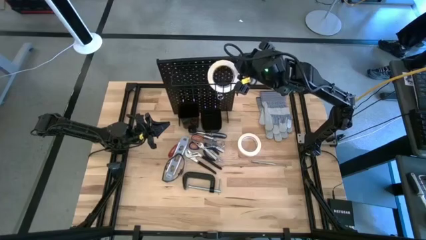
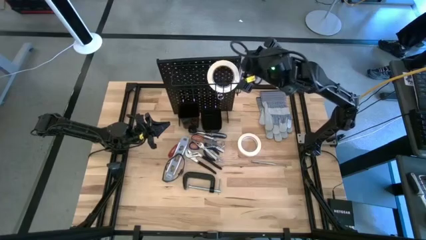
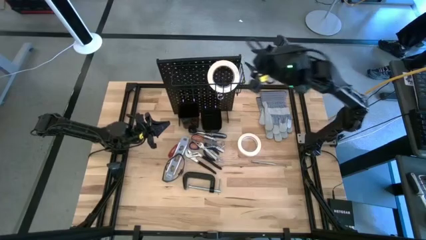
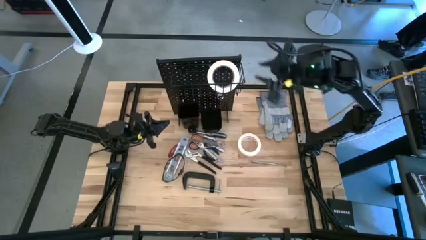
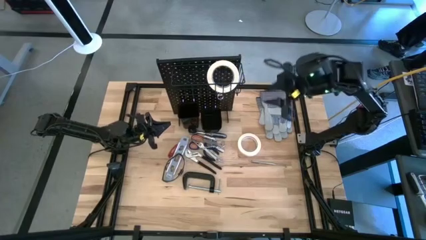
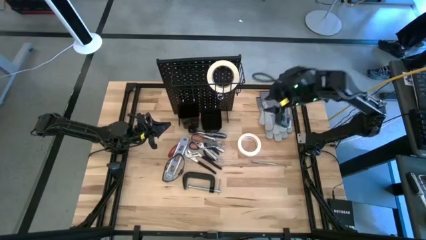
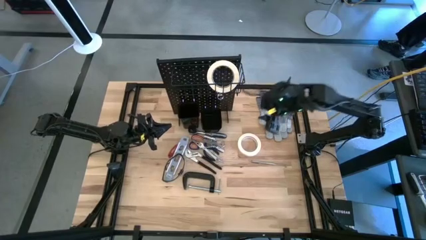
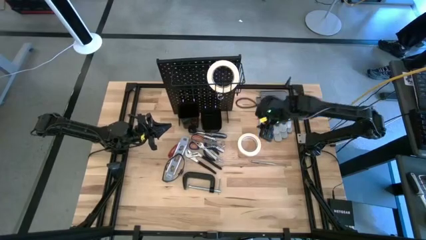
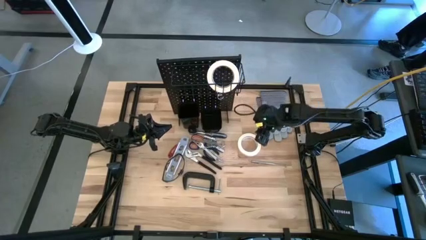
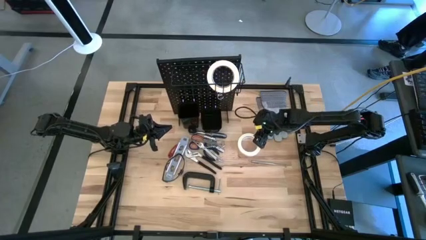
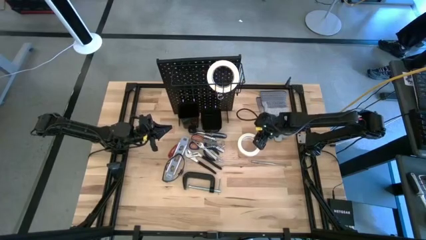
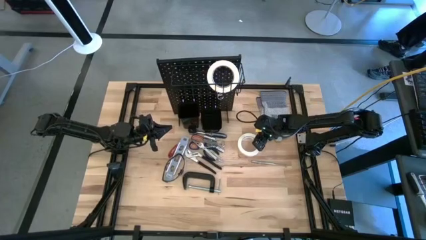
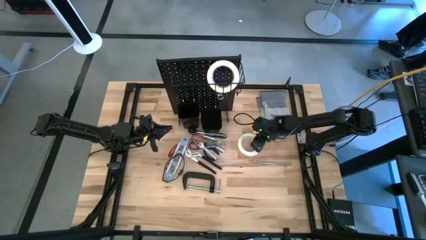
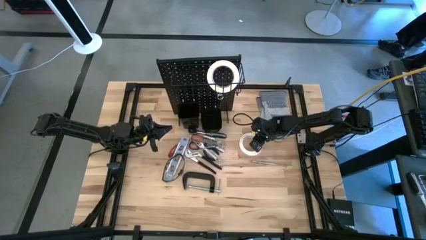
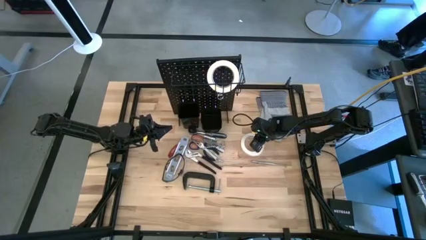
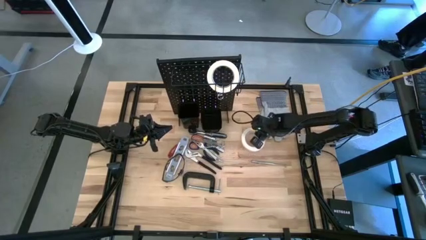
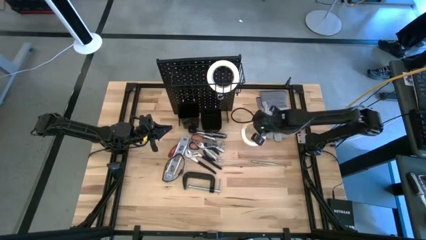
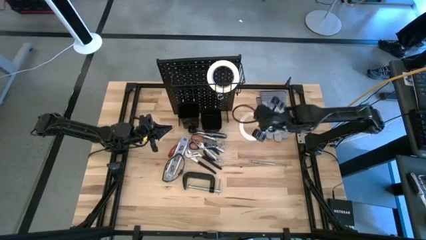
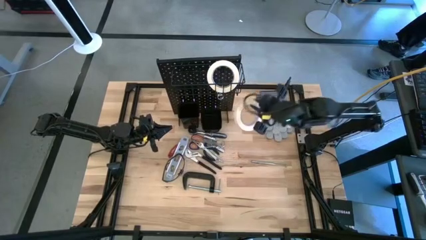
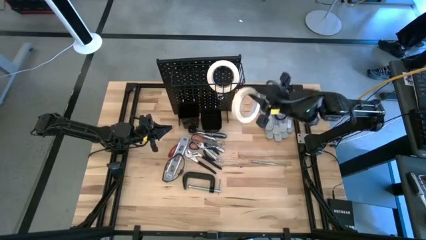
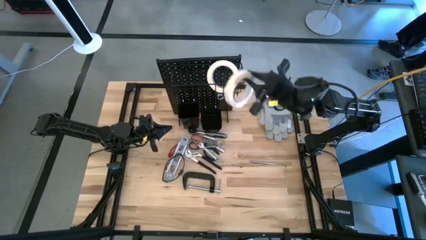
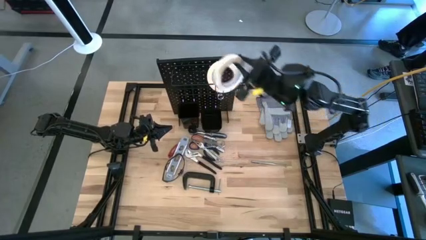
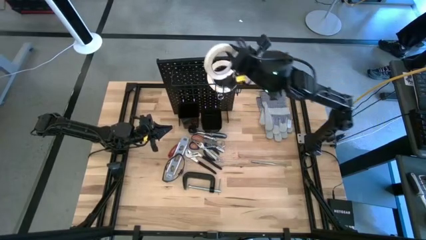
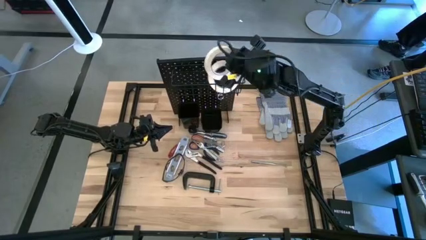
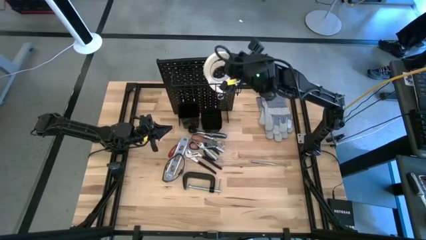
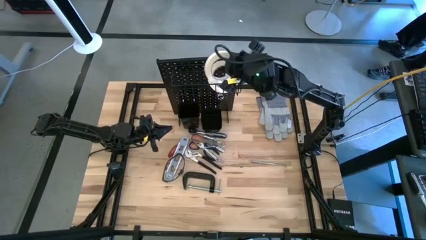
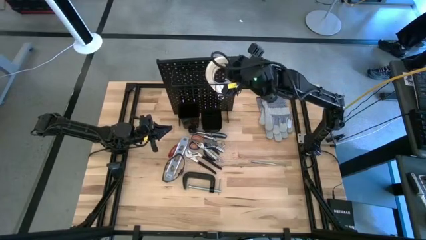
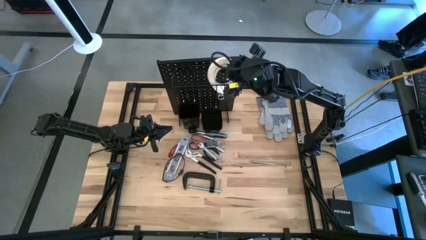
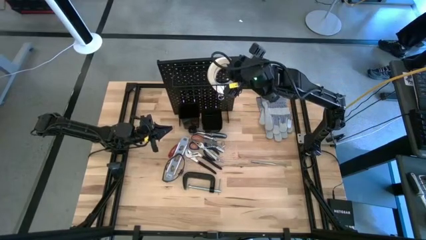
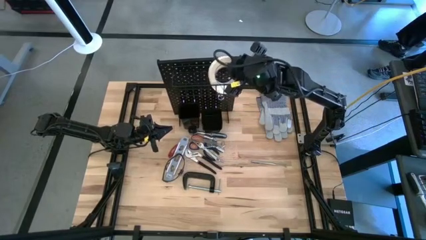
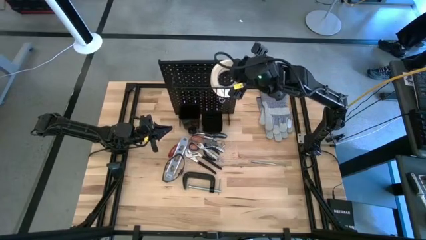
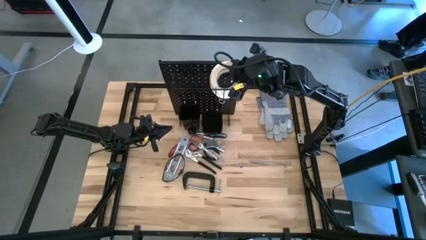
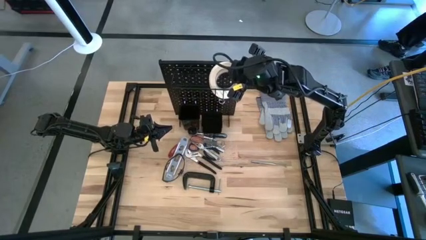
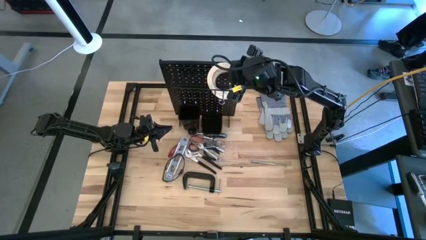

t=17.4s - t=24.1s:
Task: Hang tools onto peg board
Put the white tape into the wire basket on the pegboard

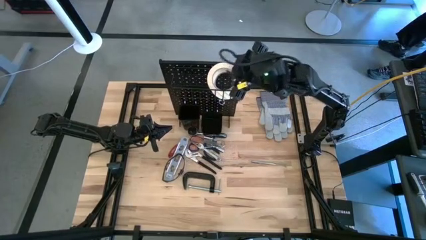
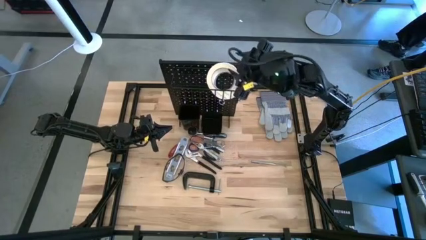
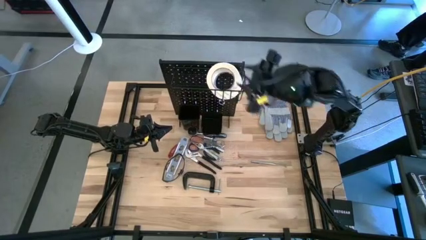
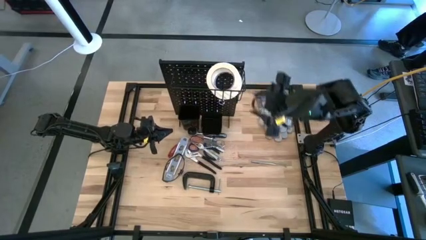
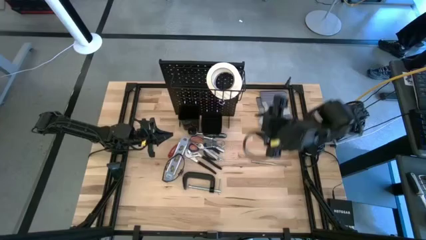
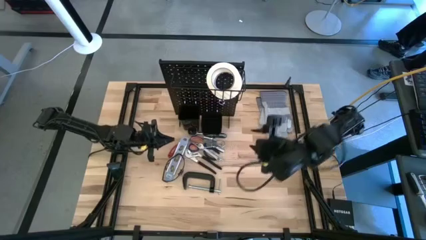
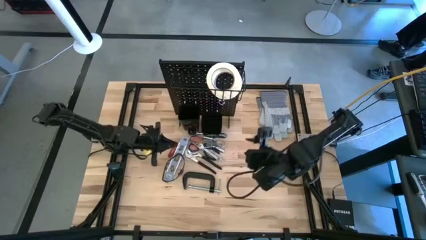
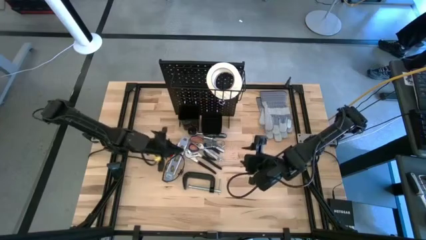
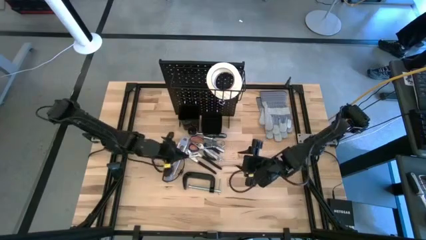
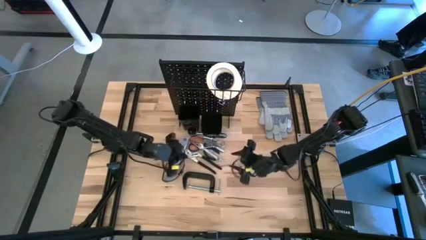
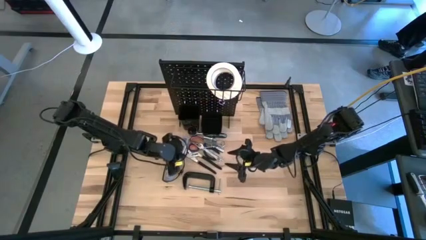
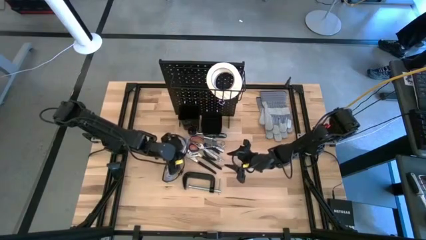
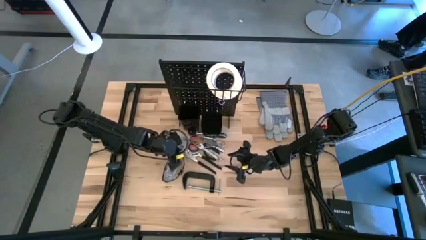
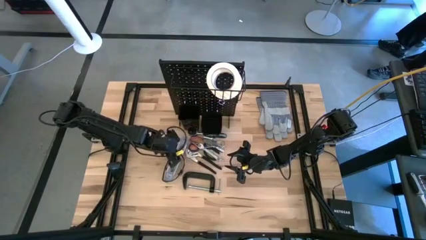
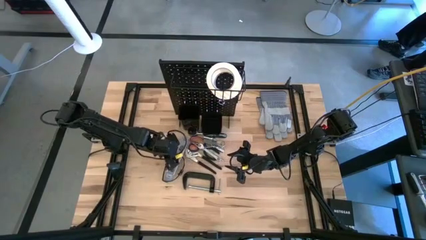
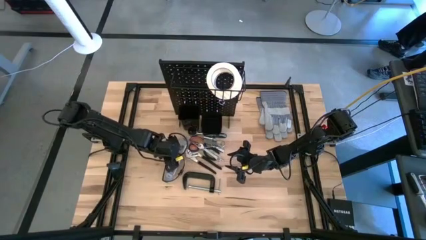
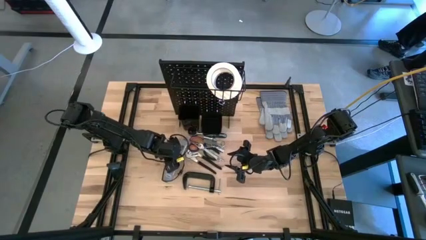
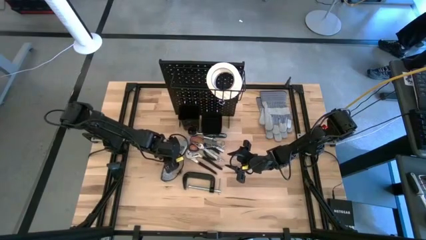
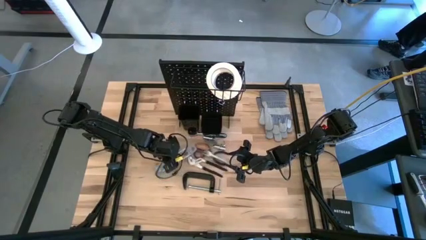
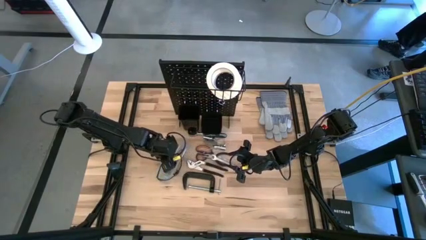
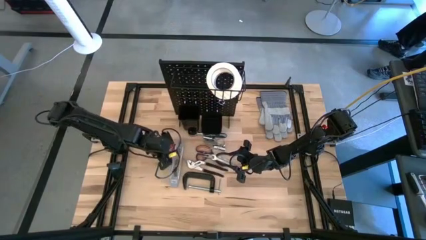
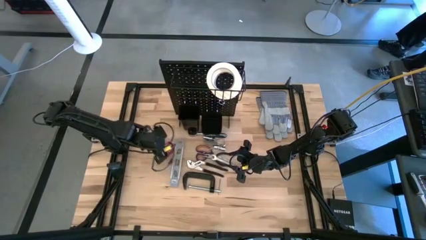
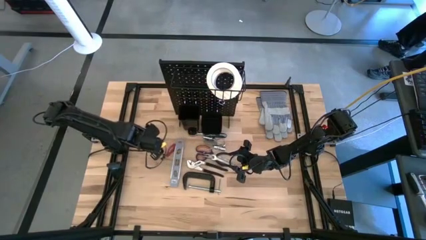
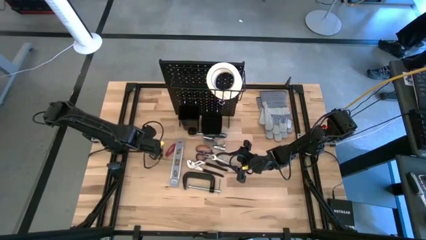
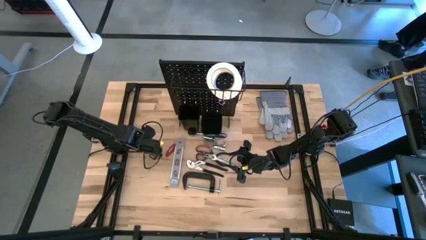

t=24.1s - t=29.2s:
Move the safety glasses

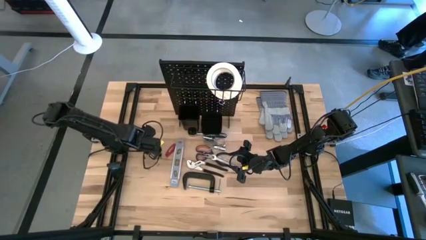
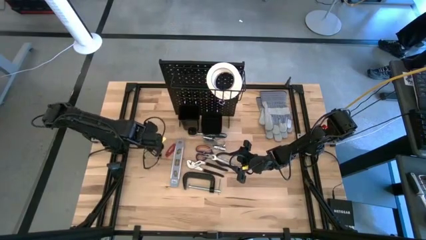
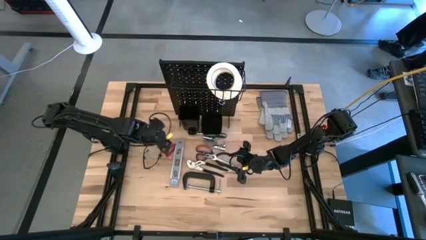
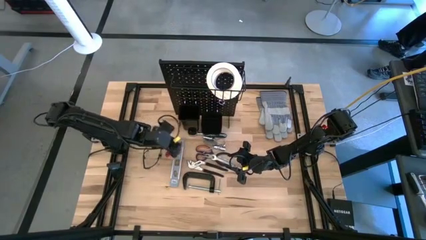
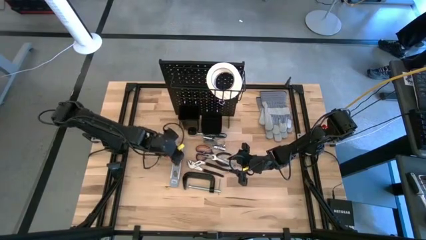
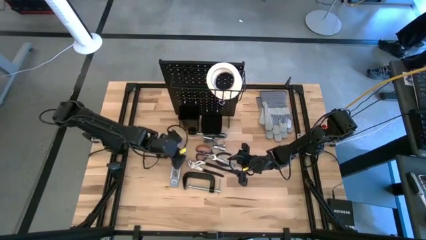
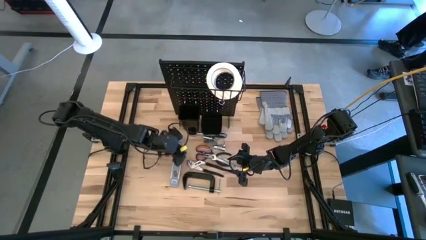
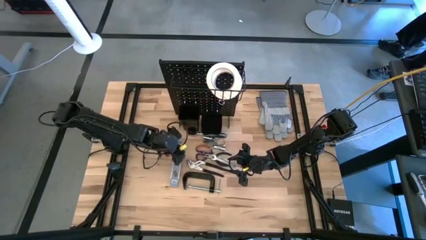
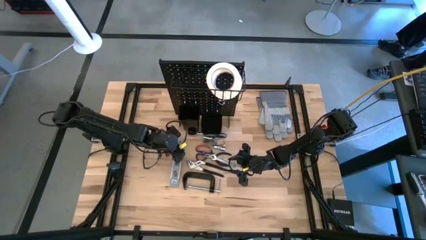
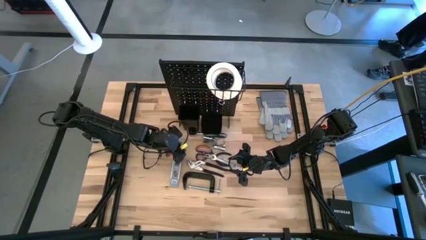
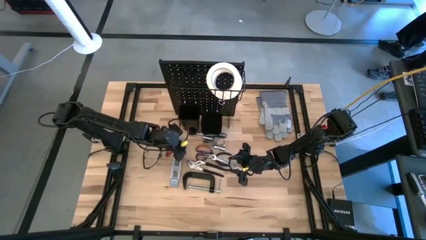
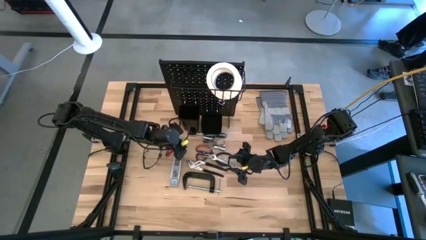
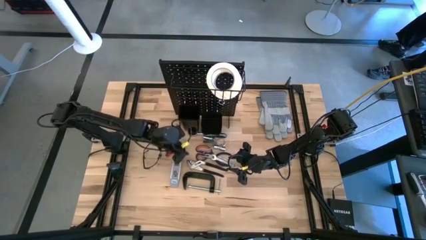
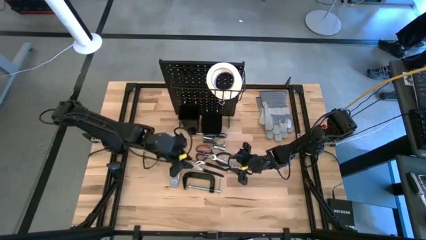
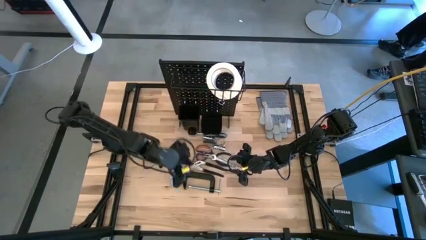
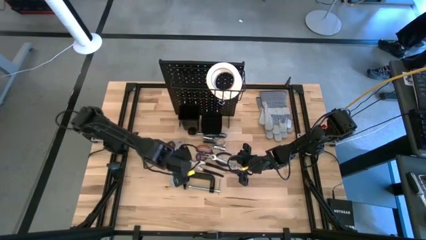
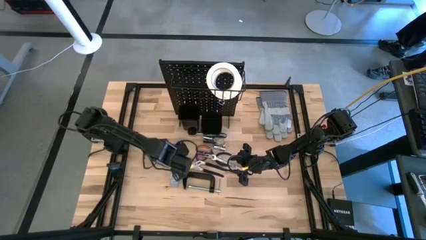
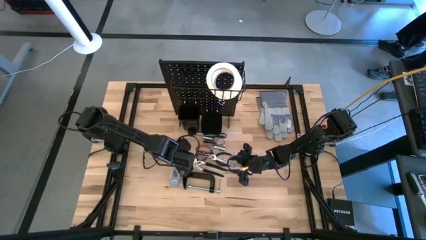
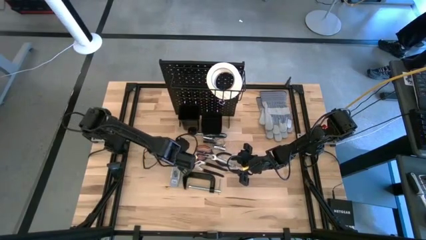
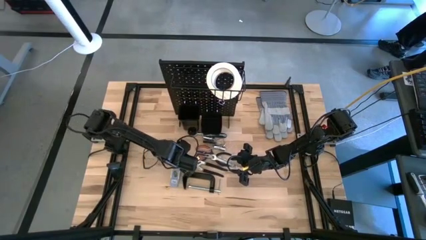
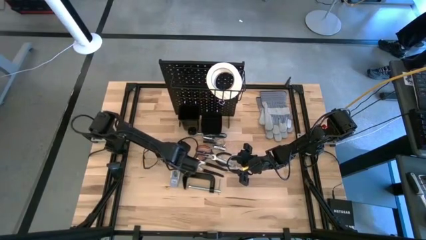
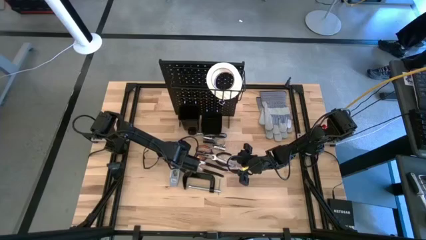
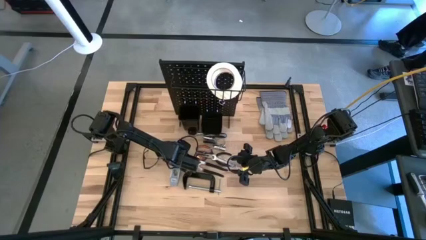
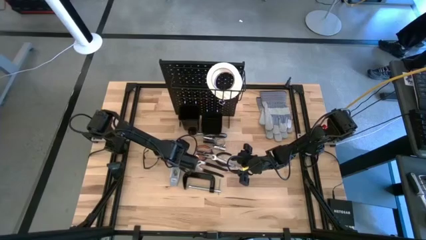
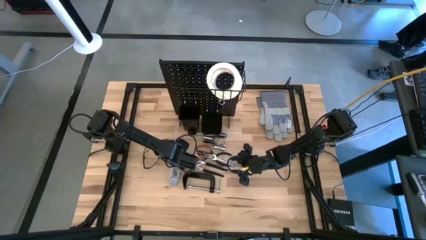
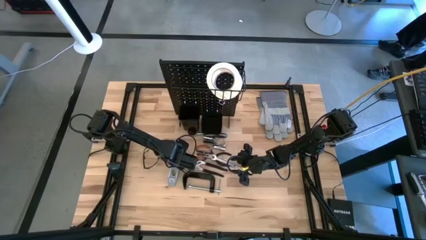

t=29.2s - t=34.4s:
Put the spirit level into the left bin on the pegboard
